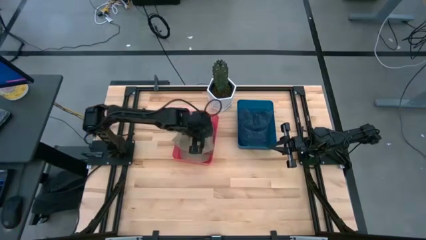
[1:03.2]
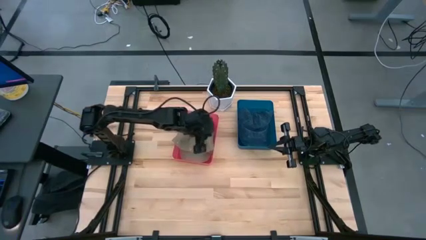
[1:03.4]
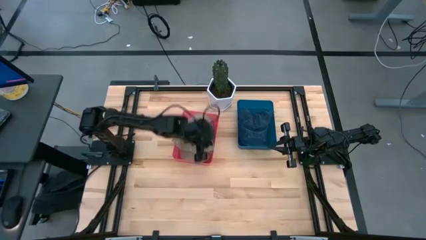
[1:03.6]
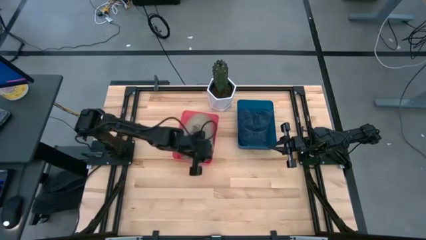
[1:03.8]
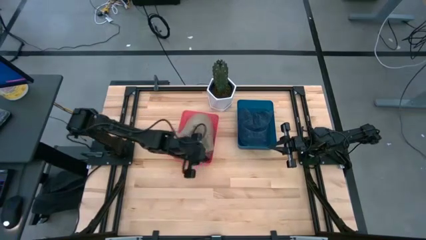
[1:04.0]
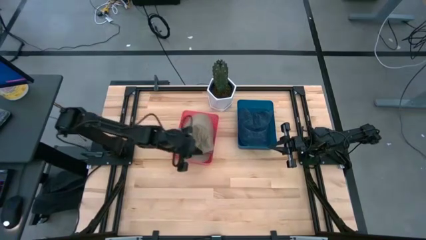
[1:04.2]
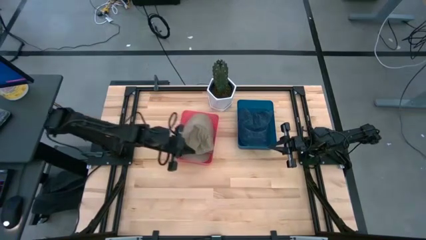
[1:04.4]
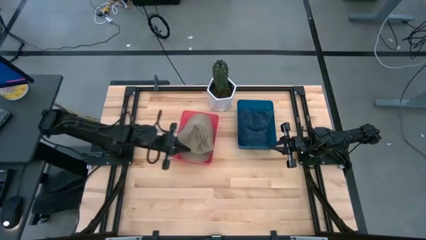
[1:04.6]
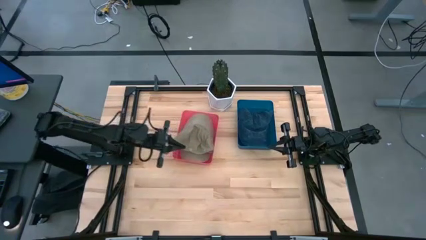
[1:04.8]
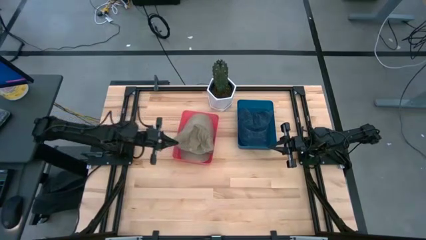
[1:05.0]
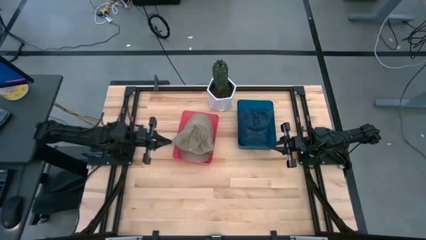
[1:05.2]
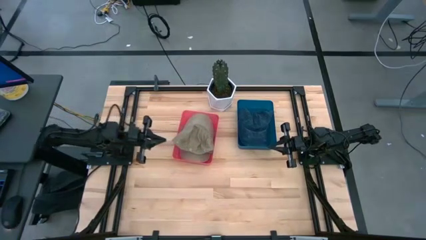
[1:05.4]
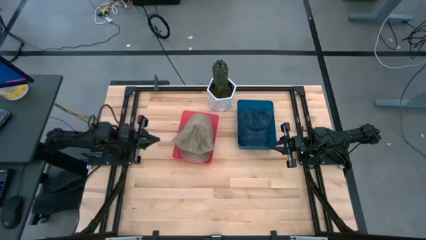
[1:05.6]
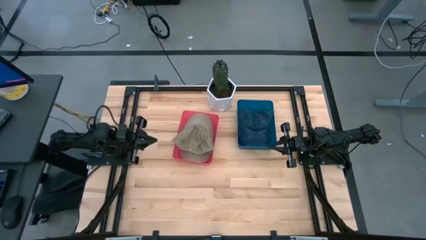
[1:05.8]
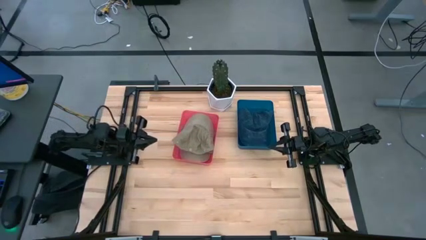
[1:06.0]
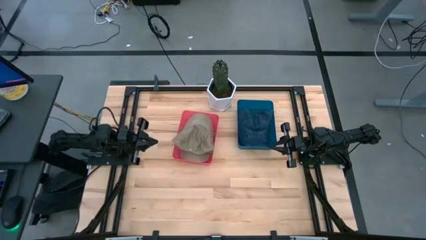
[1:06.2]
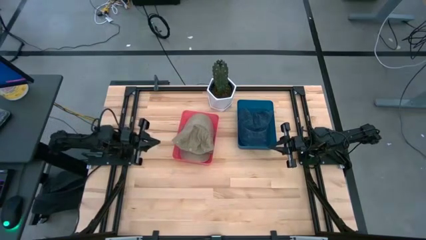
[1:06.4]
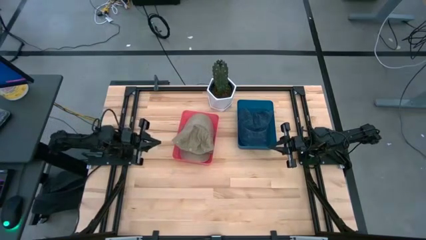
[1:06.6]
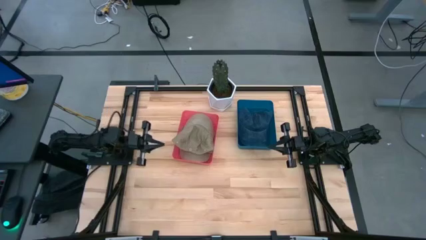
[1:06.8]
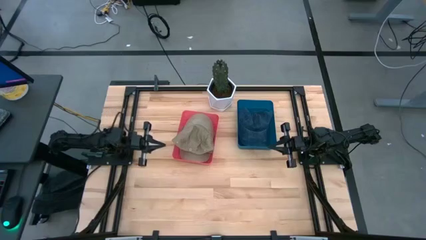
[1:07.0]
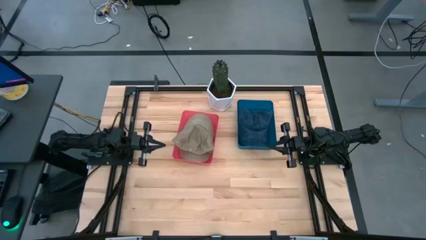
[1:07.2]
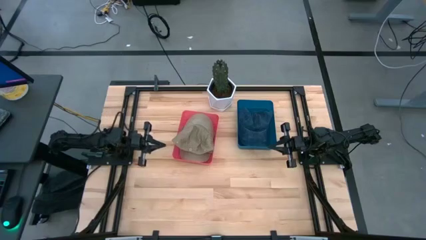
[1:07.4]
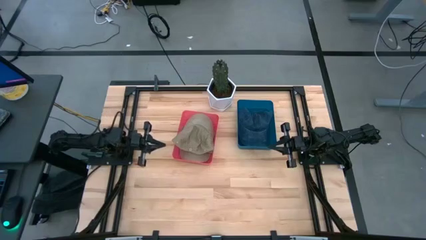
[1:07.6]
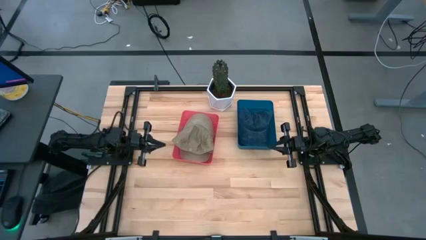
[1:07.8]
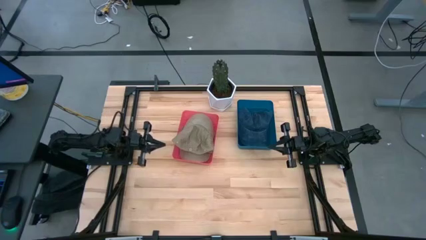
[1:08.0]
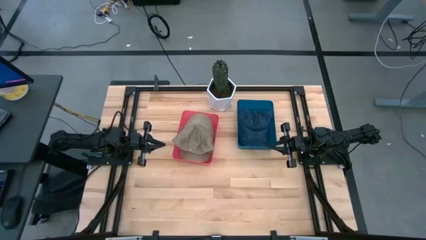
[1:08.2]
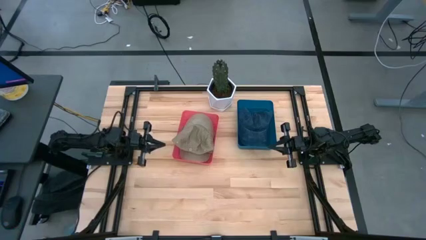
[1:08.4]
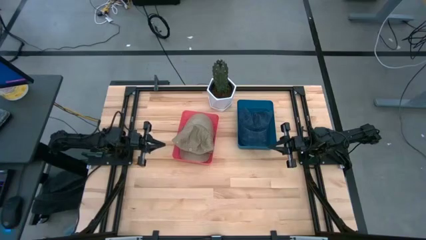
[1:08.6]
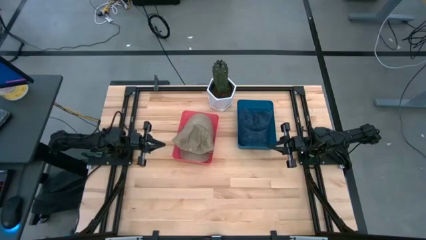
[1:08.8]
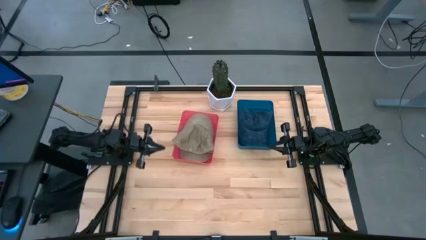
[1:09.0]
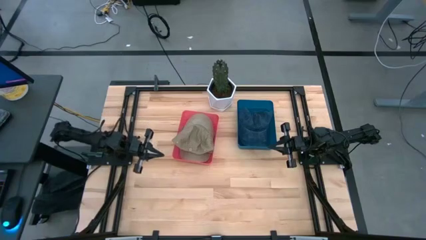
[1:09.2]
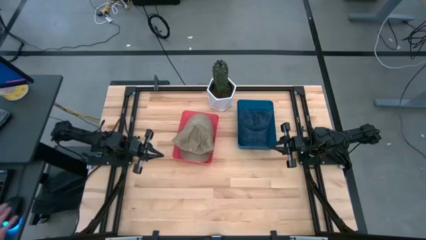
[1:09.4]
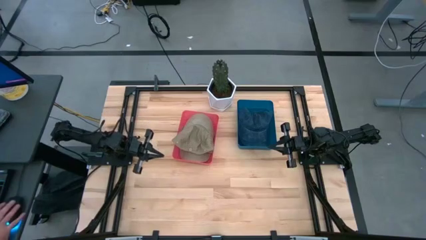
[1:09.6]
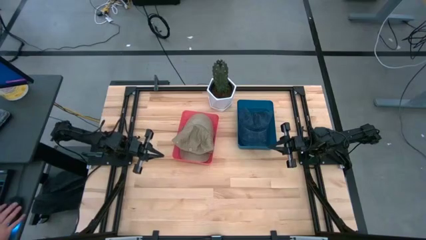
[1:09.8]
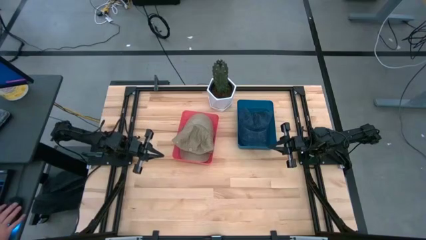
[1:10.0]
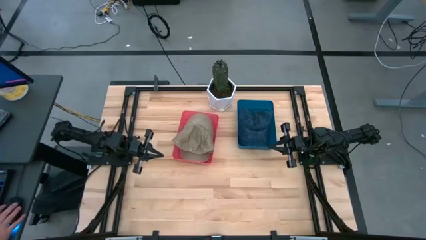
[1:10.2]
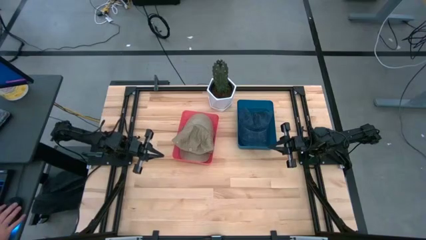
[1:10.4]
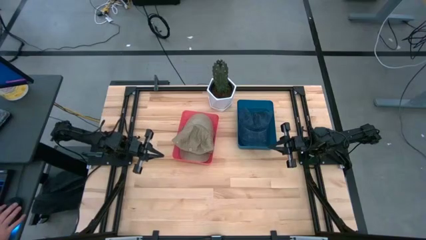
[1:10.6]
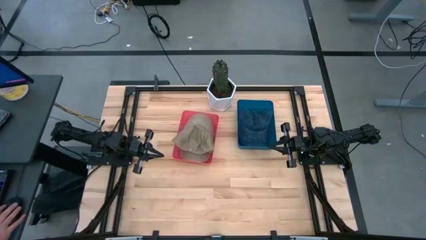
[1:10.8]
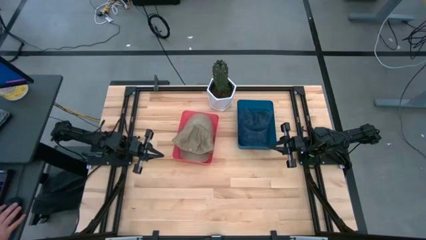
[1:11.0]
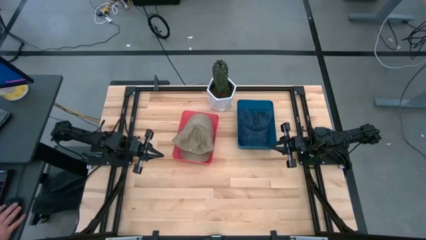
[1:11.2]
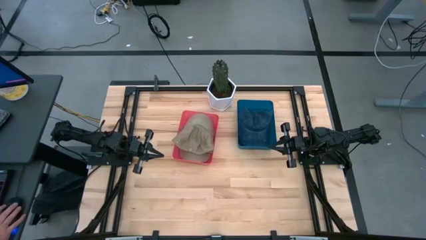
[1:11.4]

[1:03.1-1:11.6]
Task: Pick & Place hat
Return to home position

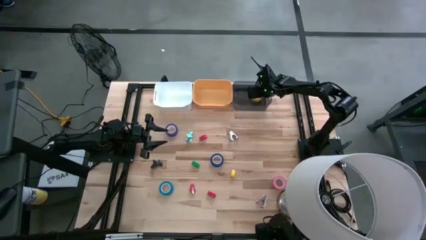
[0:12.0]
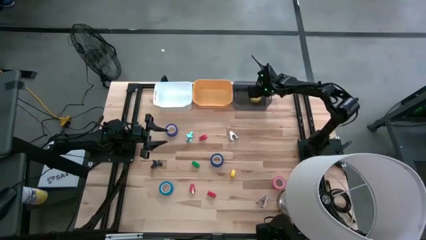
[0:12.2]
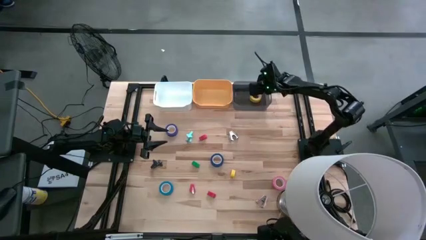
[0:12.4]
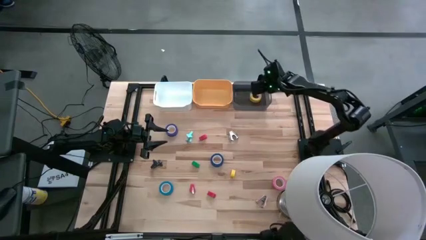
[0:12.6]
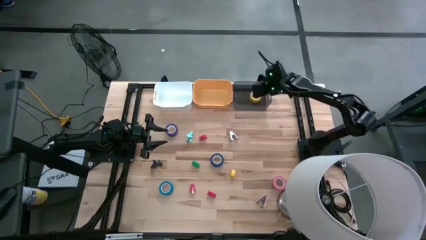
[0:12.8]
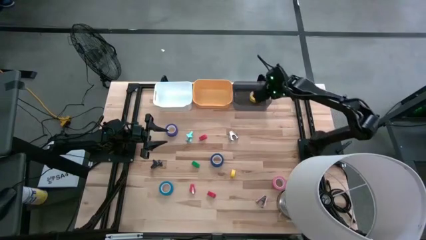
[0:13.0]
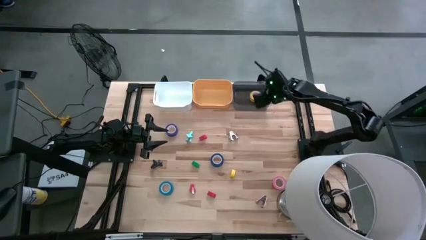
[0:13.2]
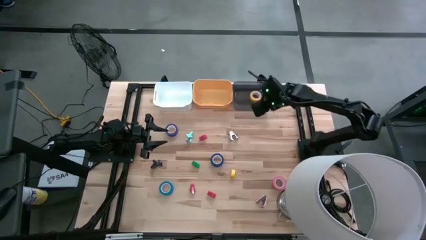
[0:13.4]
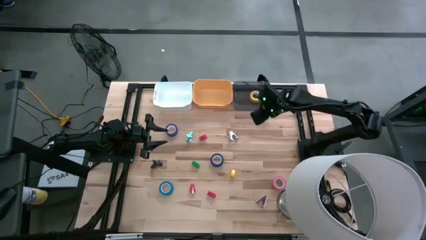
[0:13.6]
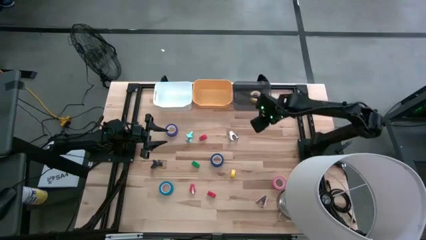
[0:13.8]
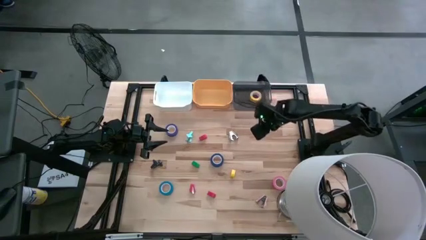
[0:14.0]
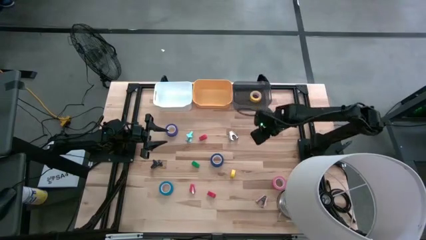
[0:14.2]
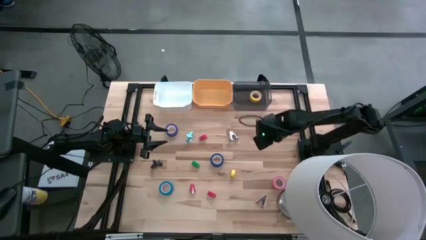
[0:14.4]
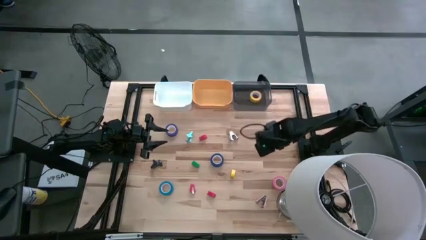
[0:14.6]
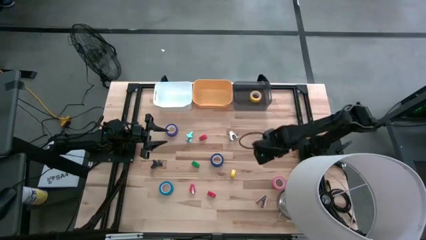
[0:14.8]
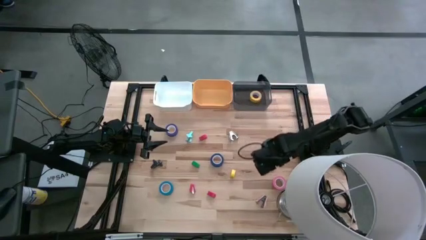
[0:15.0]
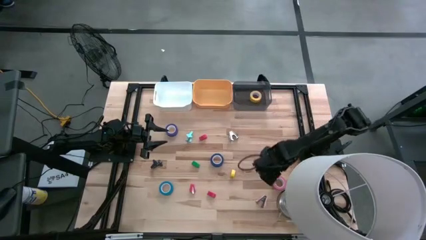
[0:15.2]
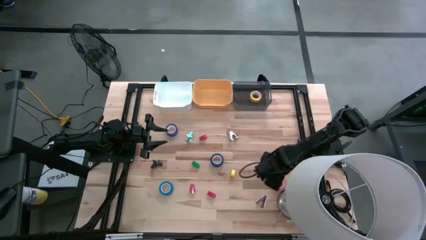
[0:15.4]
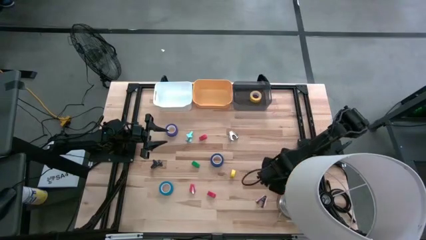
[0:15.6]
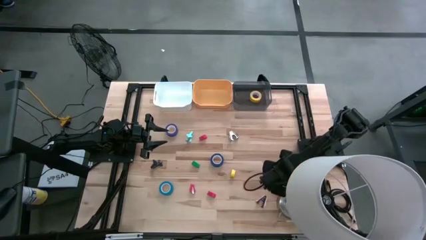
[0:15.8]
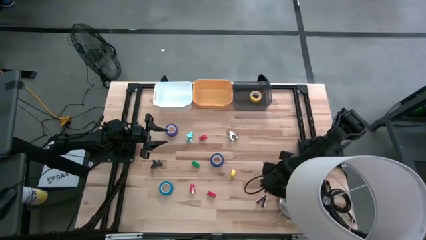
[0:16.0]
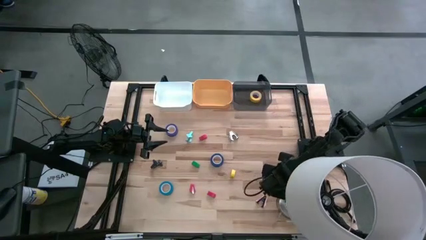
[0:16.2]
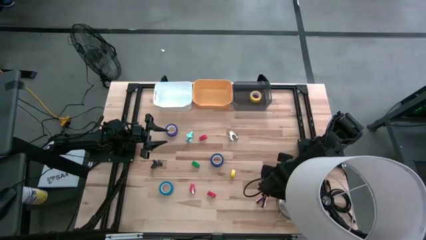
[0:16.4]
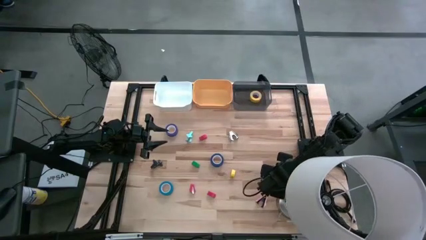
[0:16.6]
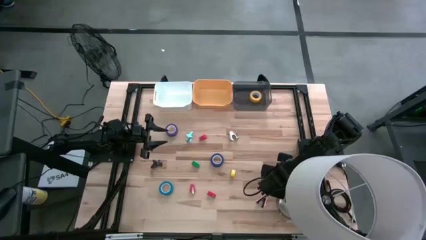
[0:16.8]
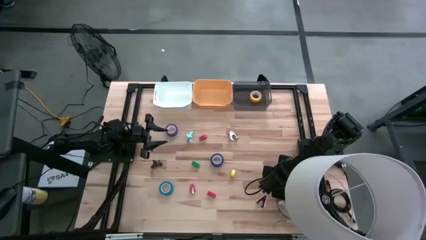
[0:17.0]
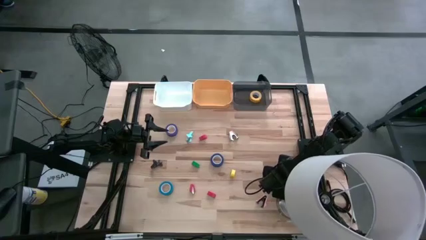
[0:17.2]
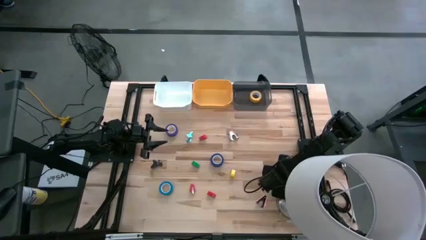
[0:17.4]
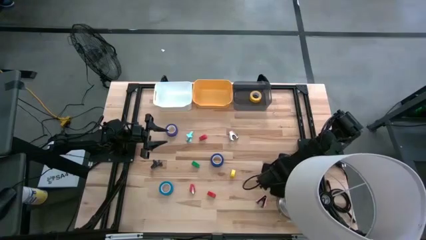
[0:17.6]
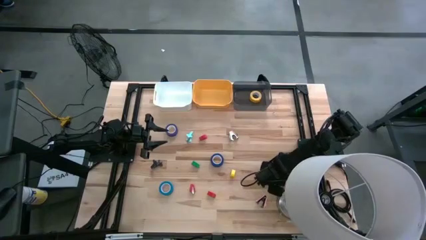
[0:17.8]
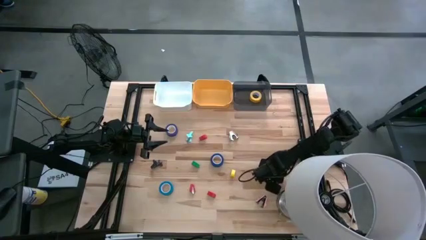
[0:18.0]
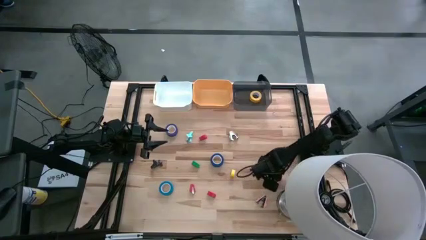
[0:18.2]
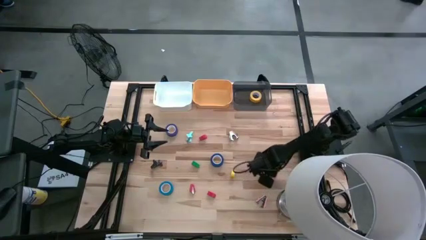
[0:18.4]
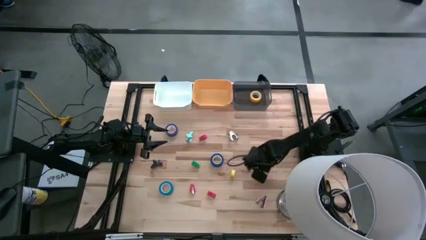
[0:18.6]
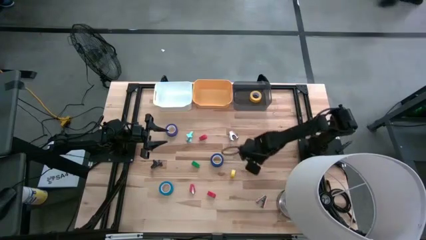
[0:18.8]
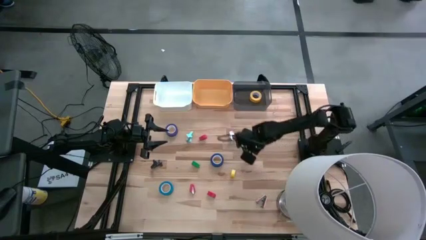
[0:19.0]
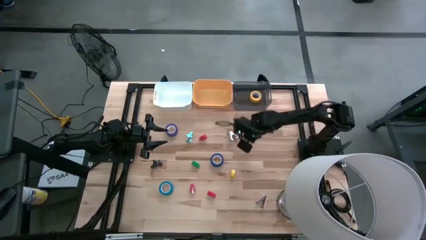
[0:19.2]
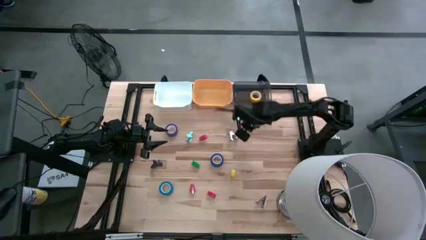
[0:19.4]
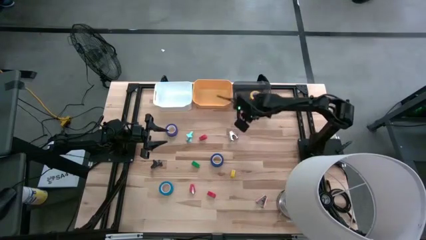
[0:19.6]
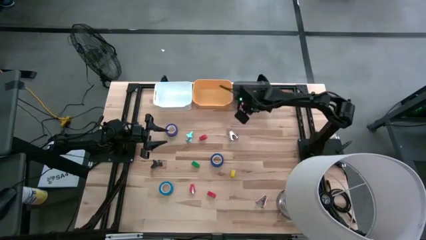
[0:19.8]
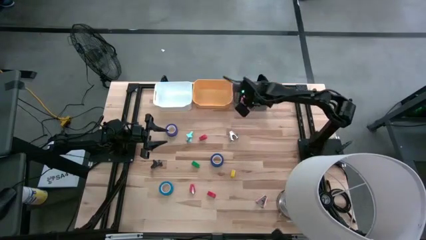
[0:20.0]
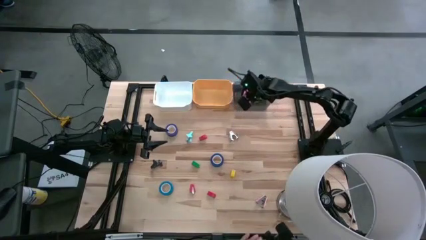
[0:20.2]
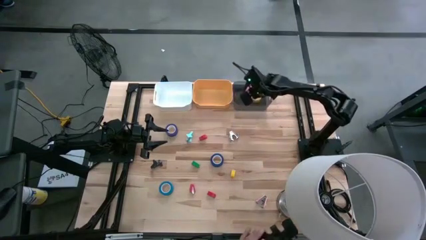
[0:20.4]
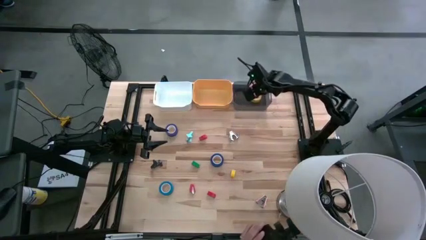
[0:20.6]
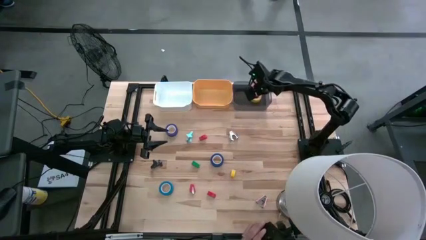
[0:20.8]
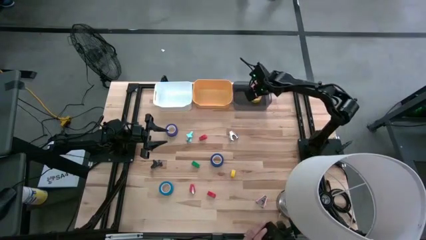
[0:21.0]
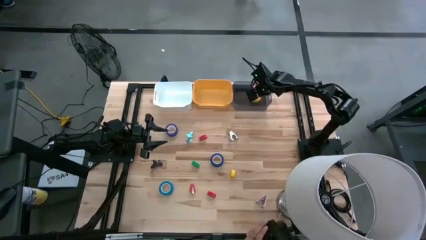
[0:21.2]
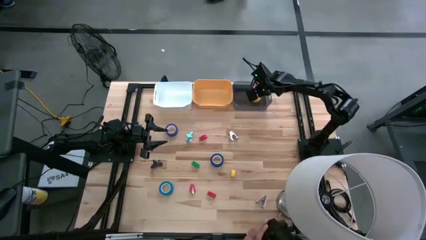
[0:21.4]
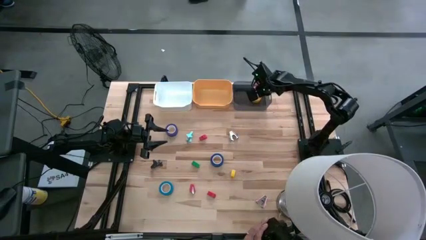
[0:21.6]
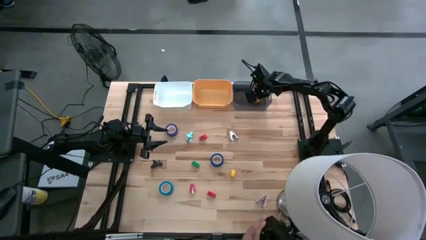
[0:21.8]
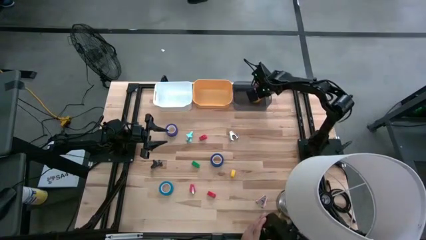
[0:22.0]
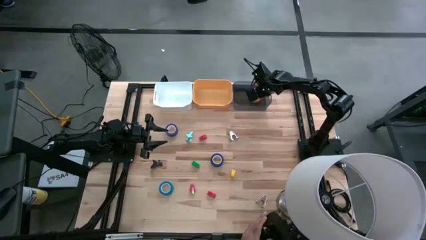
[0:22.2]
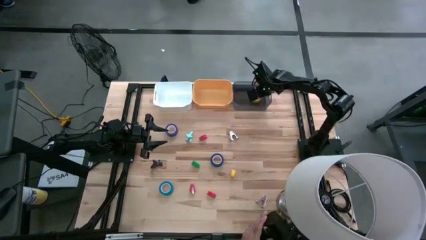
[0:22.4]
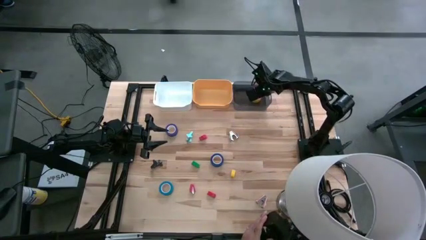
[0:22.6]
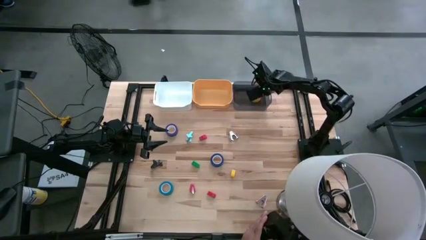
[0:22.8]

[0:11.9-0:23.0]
Task: Pick and place Stapler, Stapler remover, tape
Put the pink tape into the gray bin
